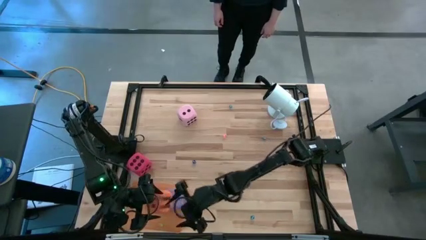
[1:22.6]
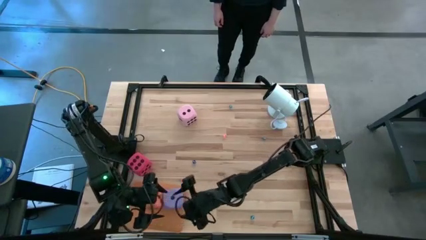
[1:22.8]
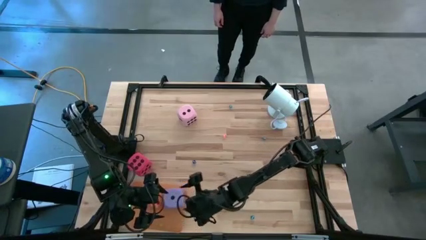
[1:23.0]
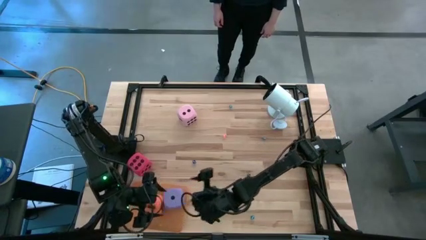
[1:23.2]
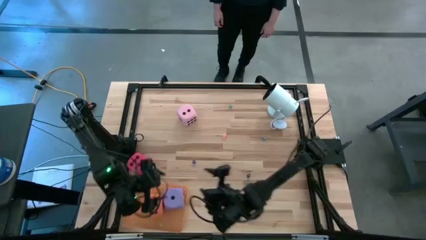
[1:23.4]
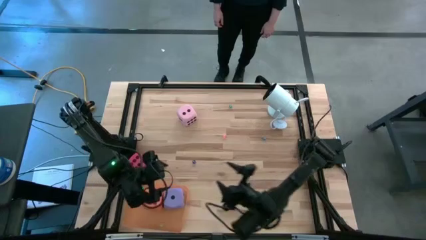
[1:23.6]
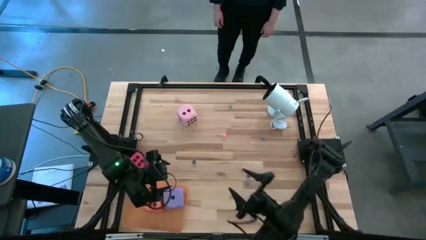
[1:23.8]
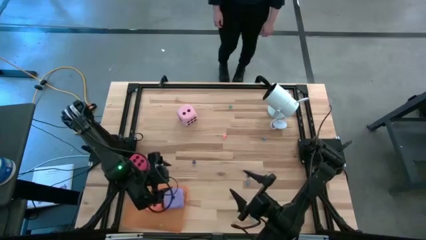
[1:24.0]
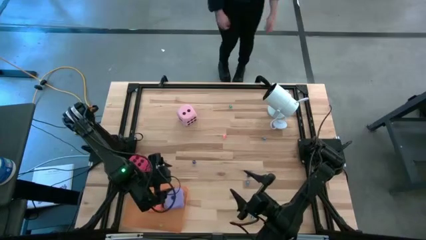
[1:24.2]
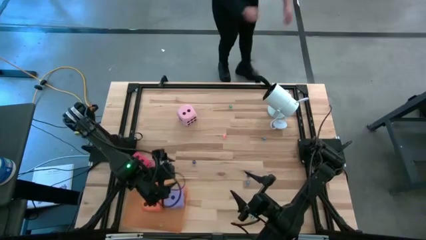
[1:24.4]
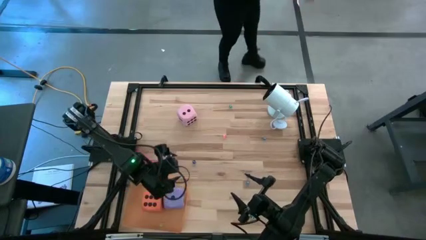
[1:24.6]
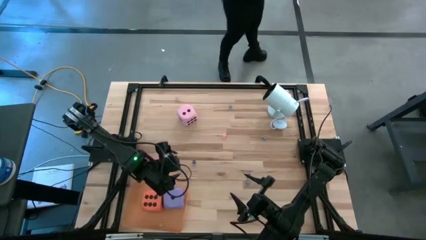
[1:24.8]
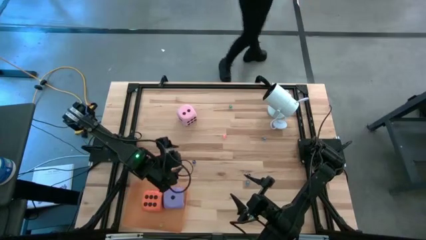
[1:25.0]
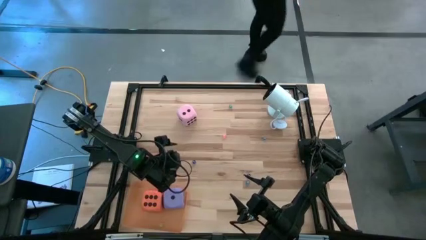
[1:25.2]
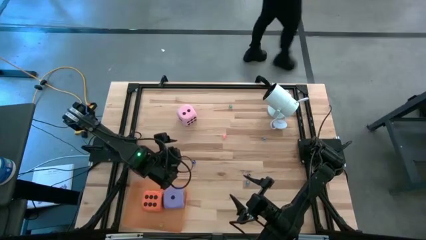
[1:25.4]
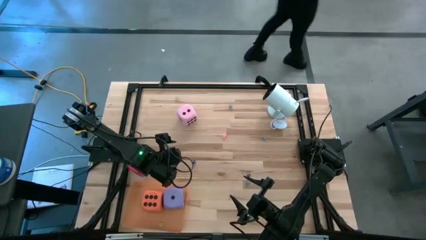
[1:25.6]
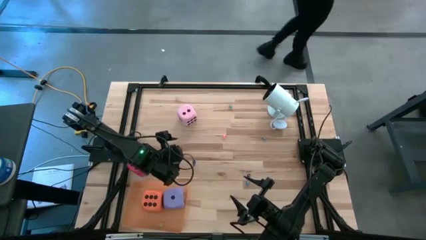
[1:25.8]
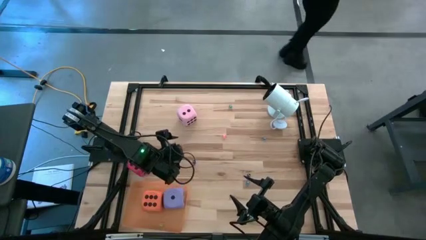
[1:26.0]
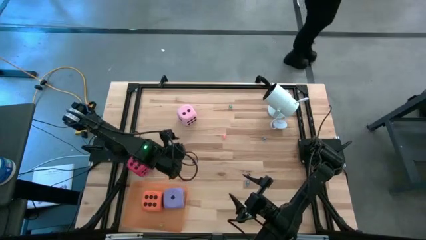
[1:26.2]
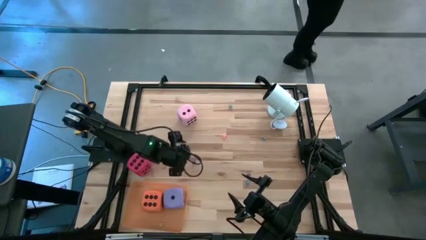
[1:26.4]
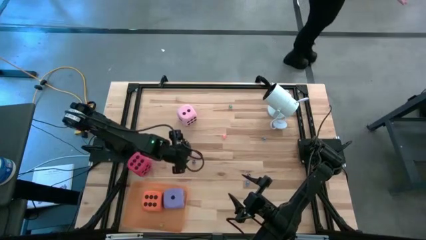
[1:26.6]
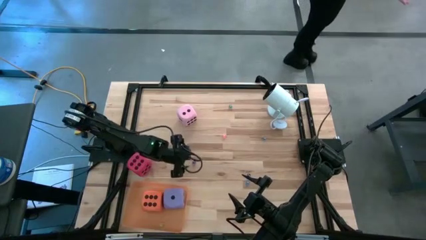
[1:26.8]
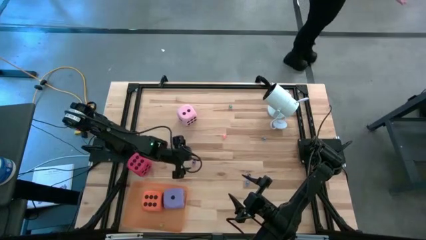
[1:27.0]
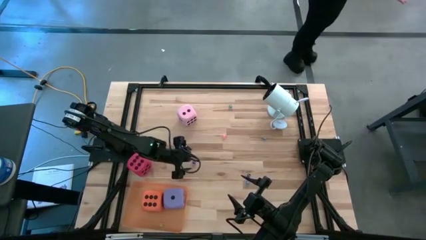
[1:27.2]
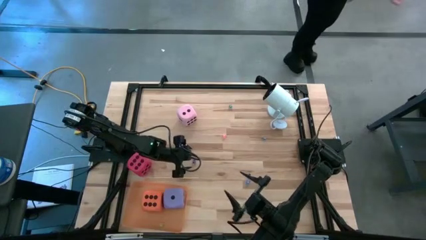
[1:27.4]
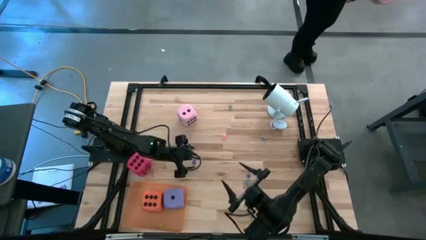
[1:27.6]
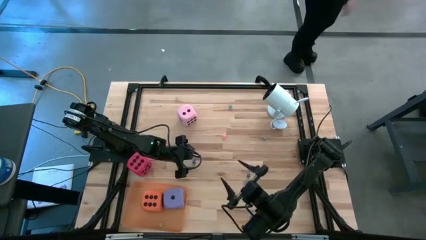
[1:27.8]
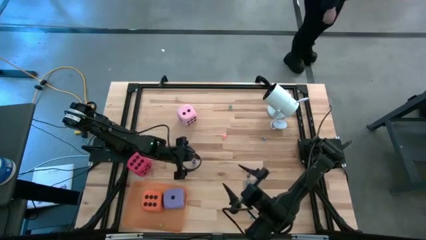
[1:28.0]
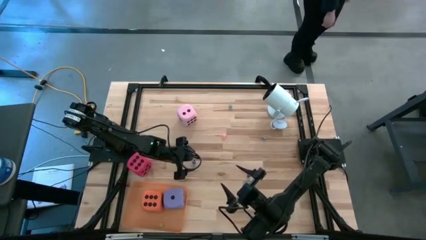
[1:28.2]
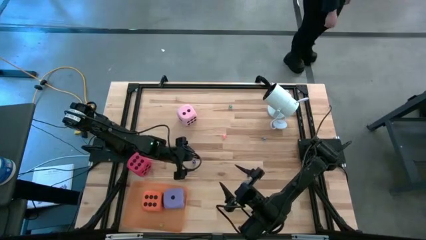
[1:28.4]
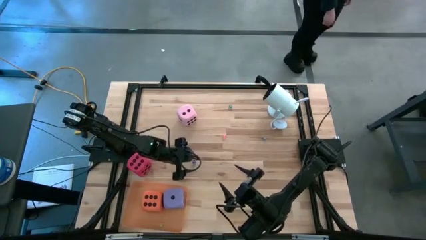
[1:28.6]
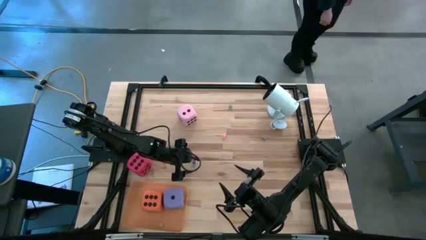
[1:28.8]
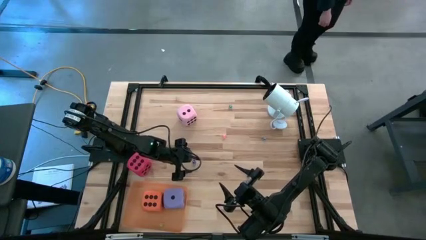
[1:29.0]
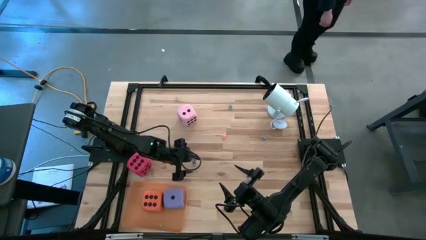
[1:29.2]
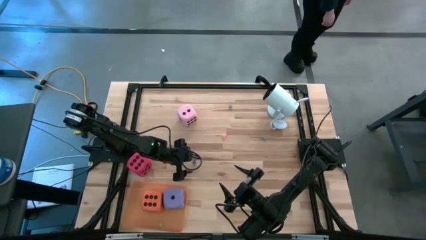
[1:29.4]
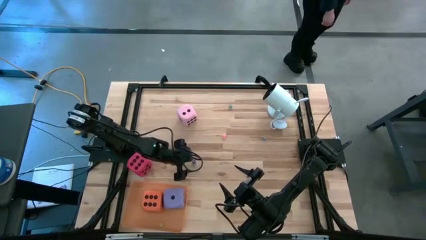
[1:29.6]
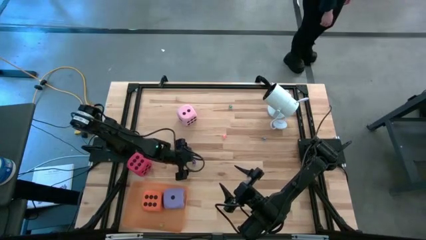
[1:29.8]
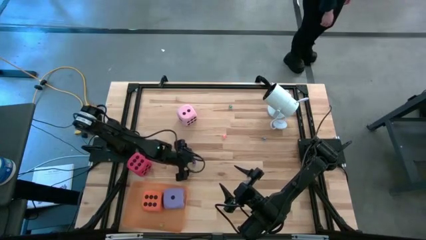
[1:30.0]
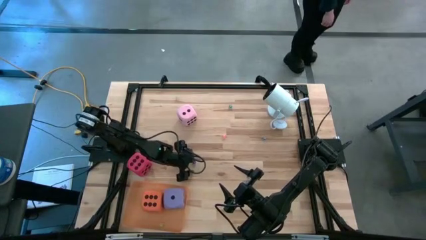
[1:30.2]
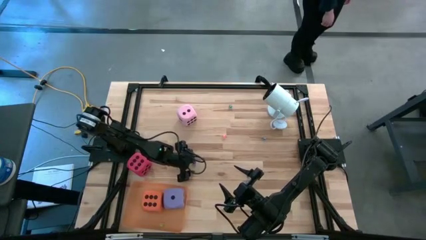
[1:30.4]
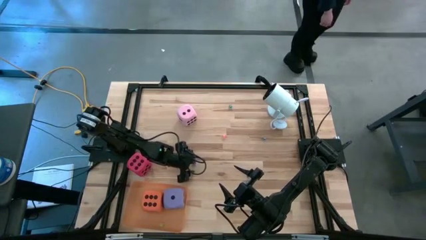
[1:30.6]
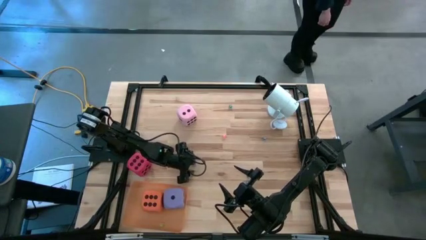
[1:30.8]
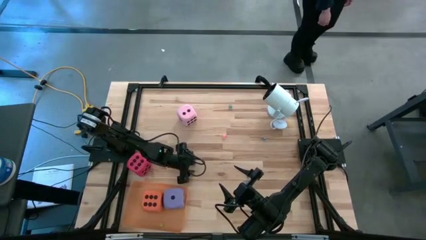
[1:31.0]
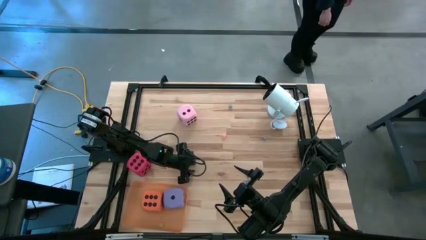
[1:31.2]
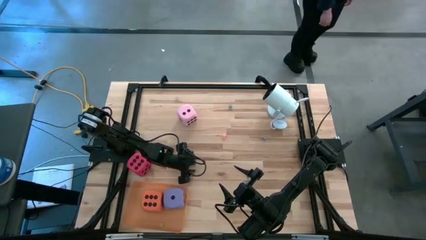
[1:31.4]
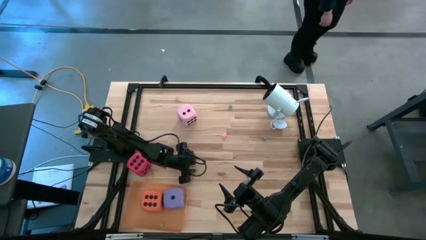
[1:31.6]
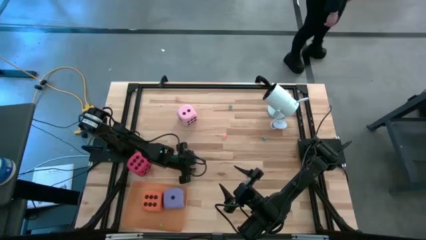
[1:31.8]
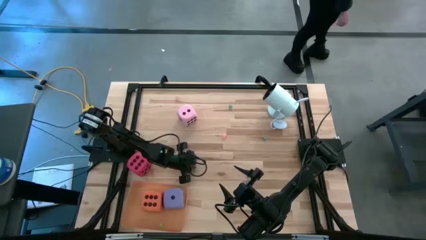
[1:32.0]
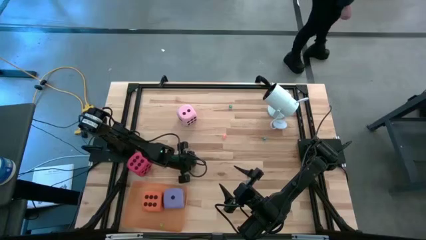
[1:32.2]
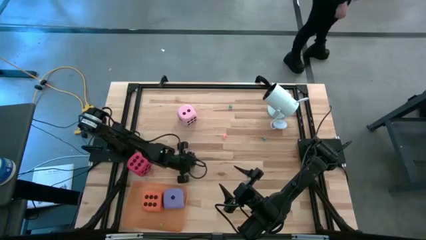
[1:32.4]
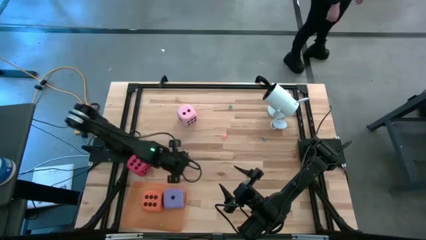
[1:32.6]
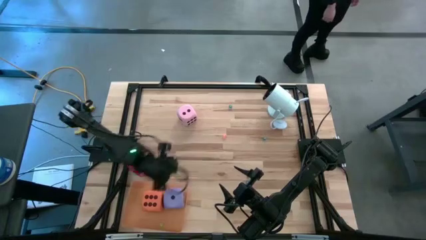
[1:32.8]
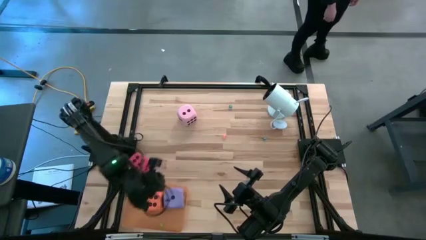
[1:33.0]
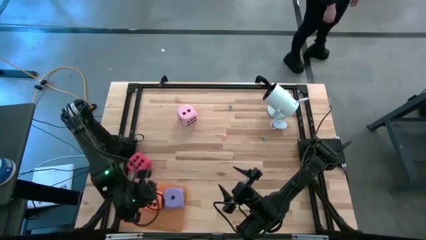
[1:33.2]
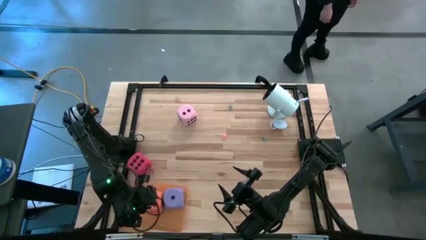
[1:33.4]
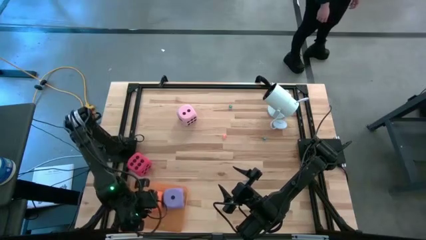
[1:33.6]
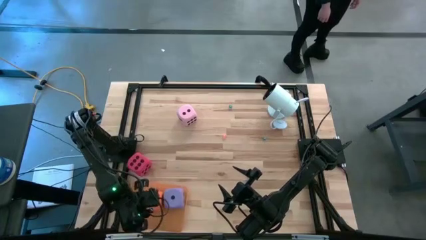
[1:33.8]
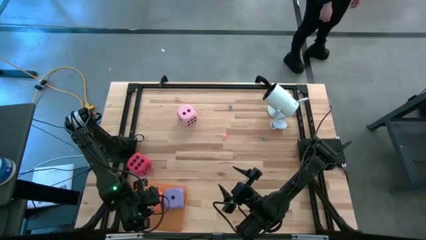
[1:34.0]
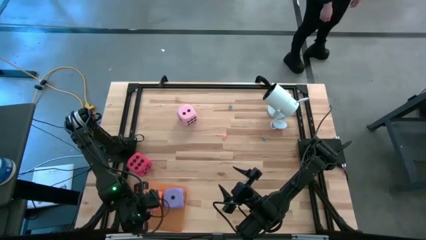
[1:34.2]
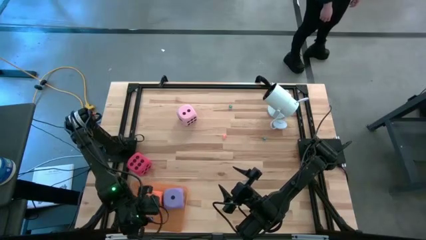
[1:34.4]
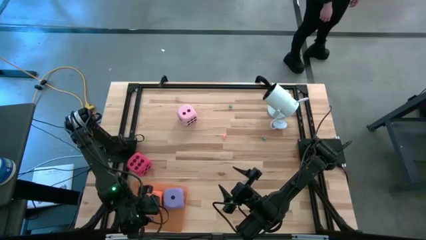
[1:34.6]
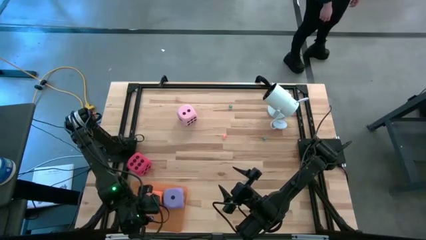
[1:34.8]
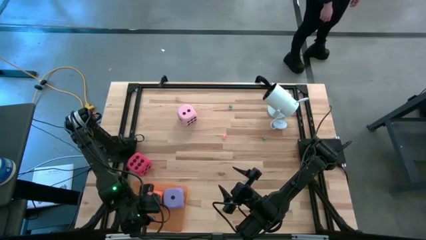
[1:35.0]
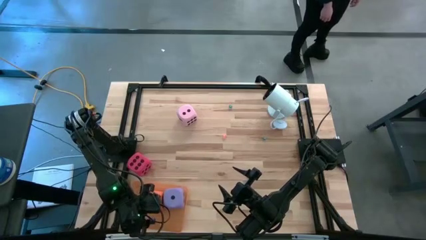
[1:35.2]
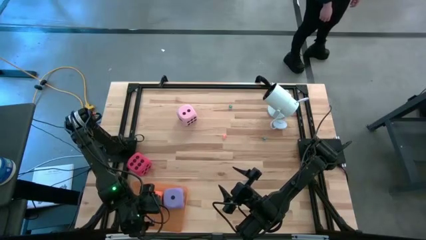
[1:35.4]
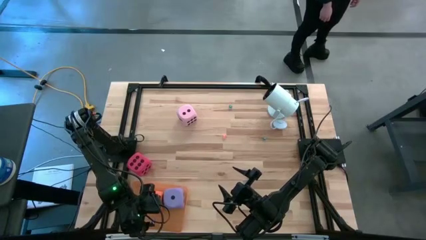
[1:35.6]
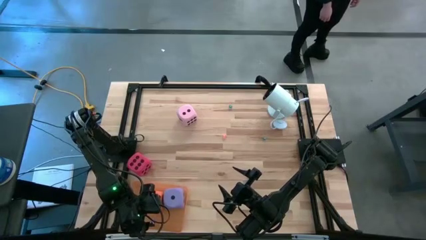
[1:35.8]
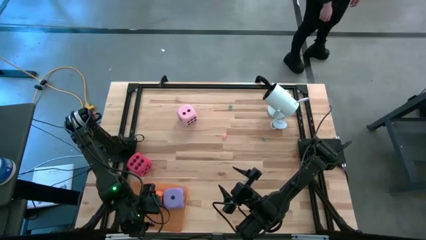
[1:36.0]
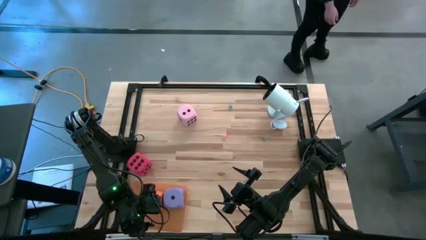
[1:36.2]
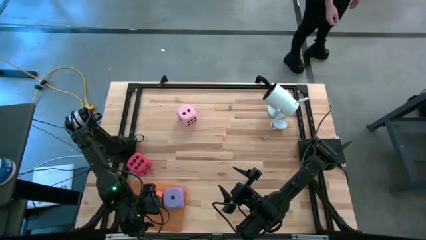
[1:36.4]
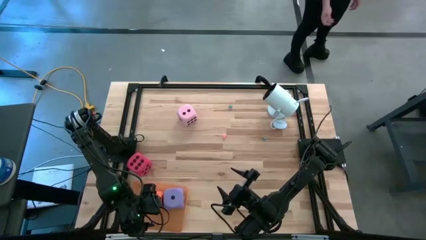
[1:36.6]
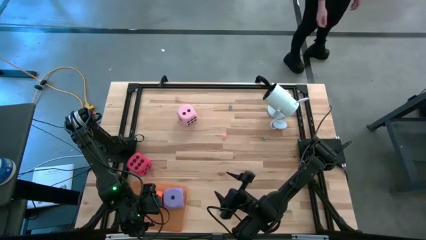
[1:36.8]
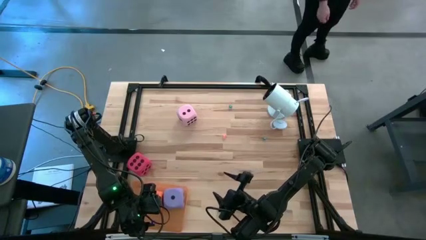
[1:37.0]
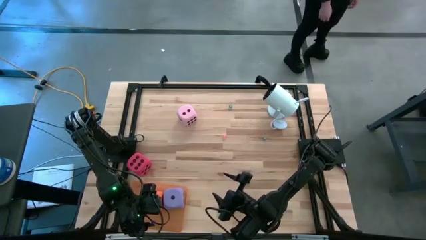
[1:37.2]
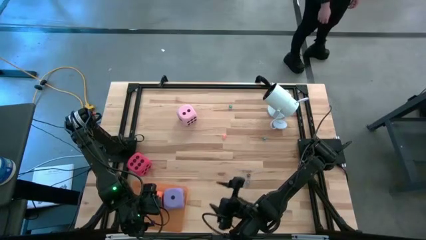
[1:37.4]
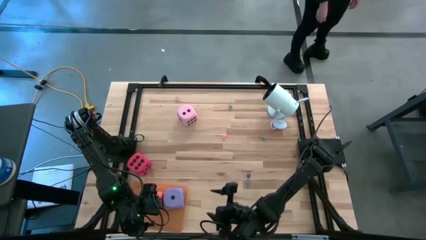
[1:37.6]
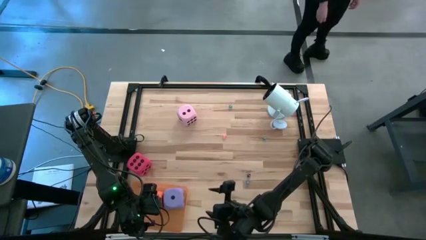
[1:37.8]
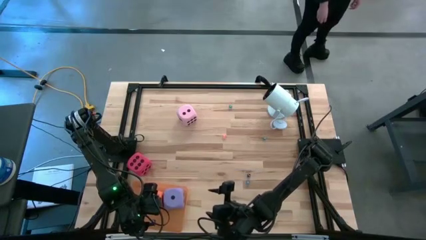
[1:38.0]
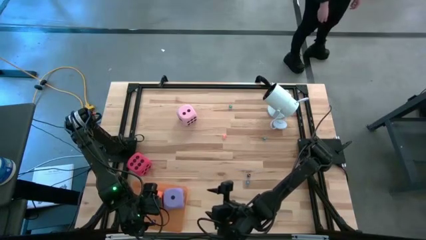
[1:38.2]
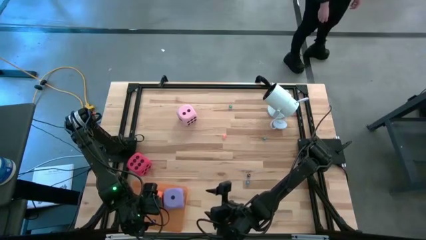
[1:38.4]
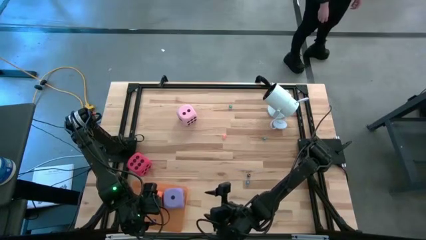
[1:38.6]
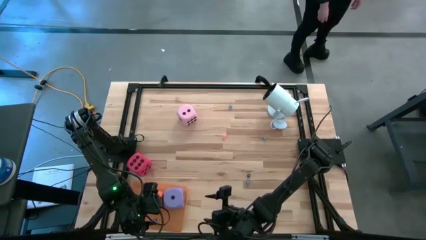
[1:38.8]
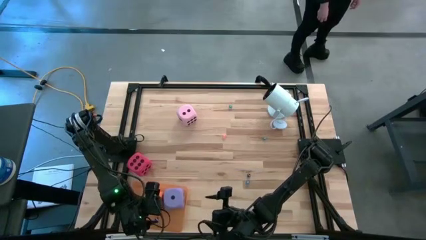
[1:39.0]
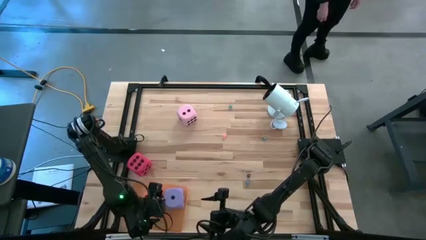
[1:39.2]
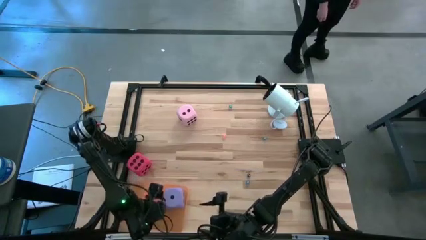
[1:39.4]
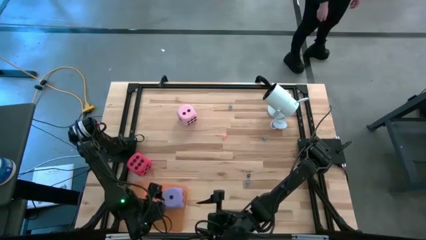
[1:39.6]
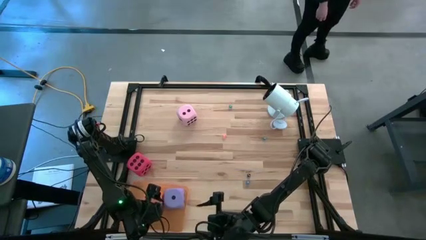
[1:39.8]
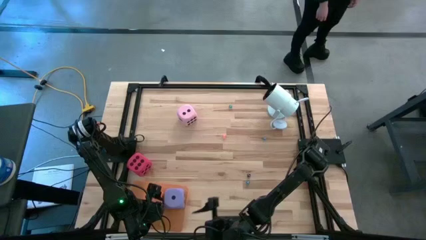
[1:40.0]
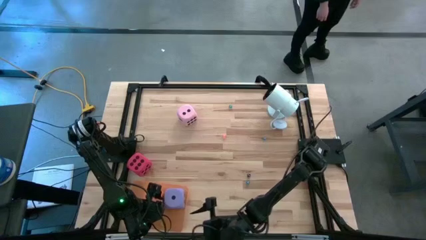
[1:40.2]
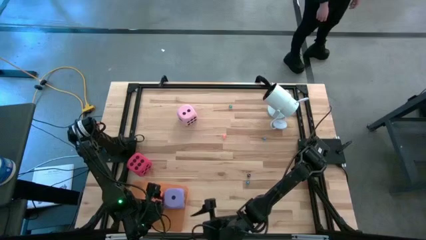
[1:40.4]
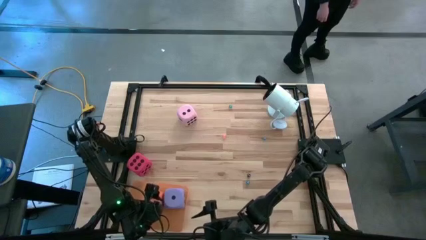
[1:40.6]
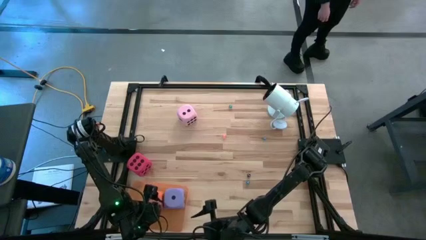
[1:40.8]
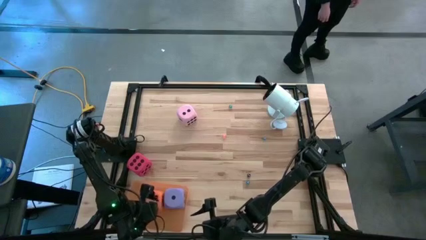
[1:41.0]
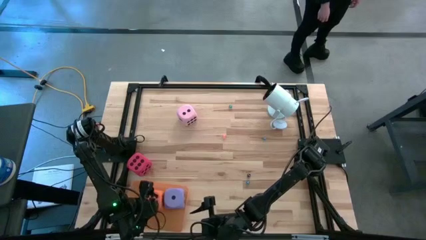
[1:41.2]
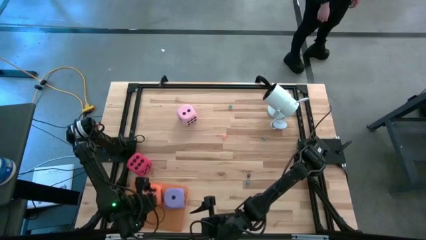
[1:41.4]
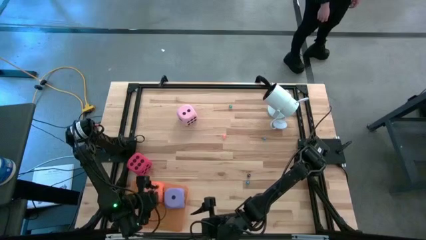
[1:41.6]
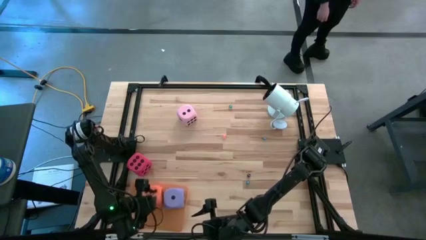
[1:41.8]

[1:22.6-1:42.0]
Task: Pick & Place Dice
Put the small blue dice into the orange bin
